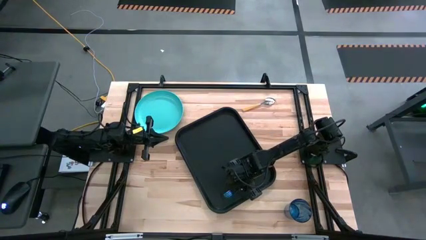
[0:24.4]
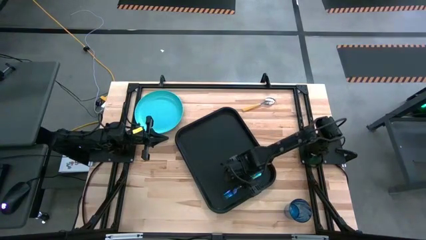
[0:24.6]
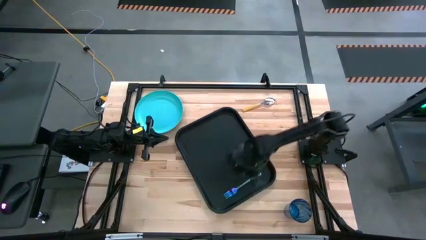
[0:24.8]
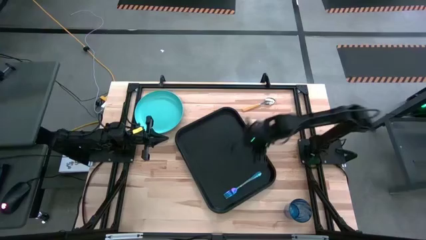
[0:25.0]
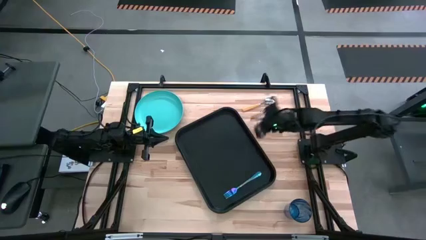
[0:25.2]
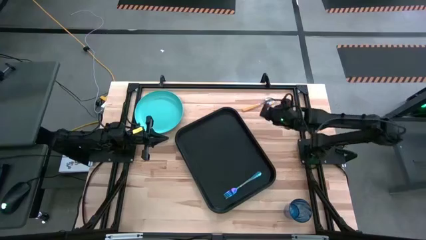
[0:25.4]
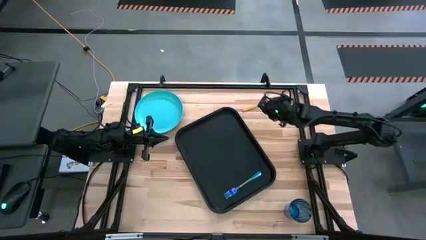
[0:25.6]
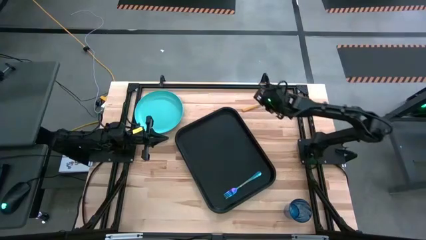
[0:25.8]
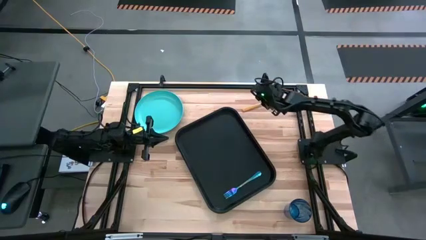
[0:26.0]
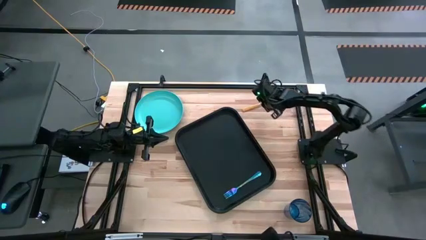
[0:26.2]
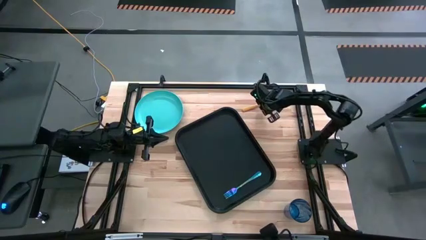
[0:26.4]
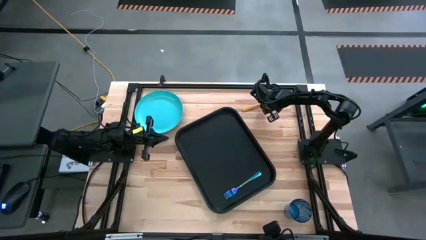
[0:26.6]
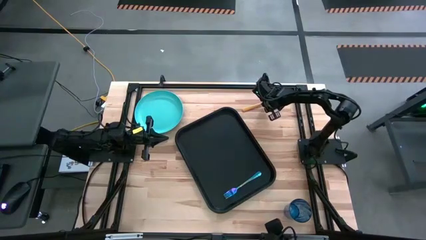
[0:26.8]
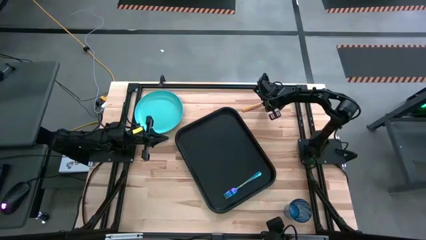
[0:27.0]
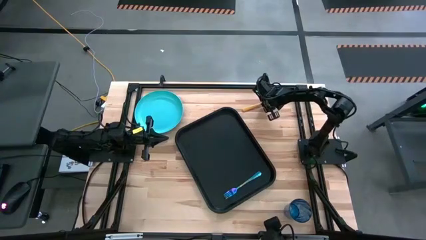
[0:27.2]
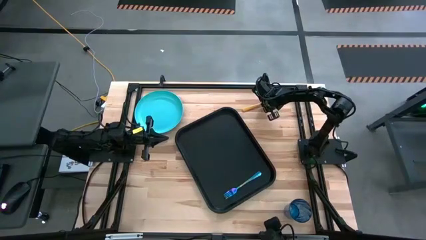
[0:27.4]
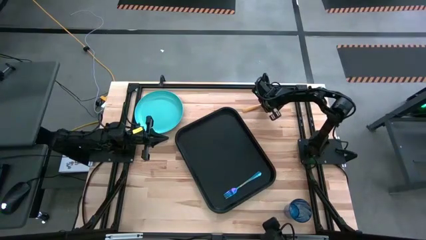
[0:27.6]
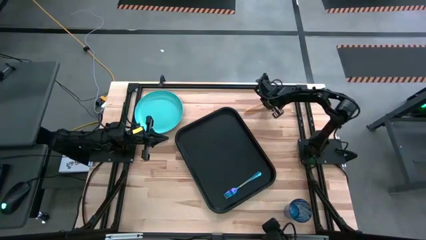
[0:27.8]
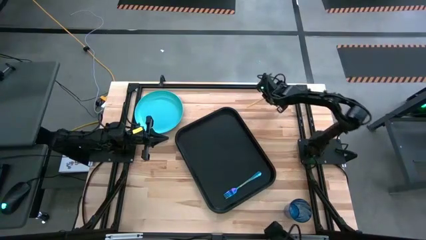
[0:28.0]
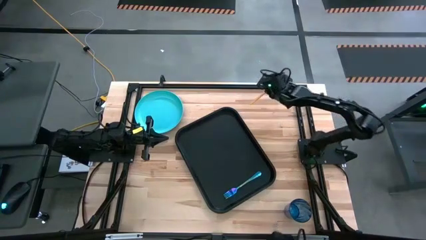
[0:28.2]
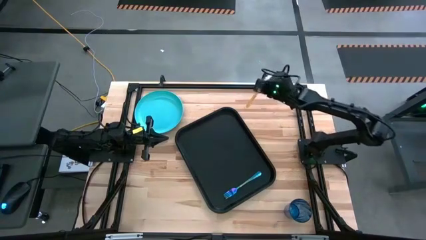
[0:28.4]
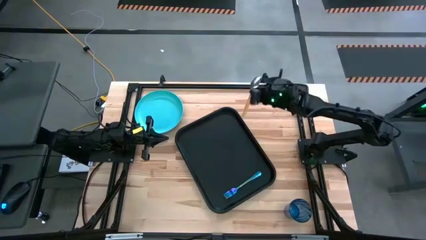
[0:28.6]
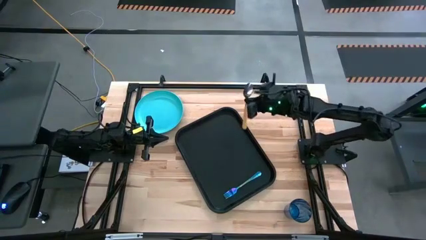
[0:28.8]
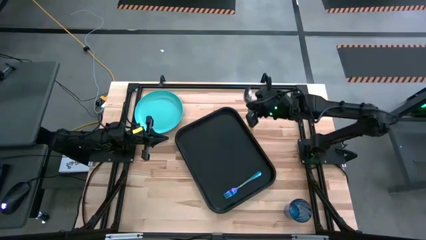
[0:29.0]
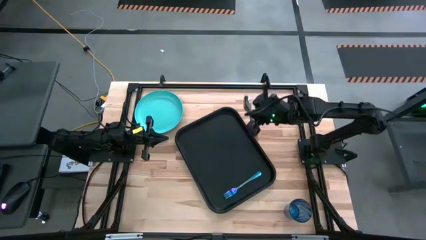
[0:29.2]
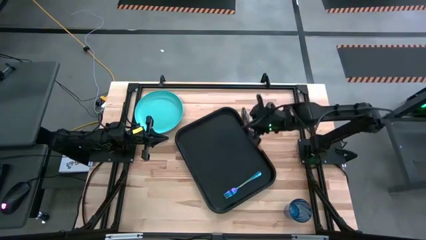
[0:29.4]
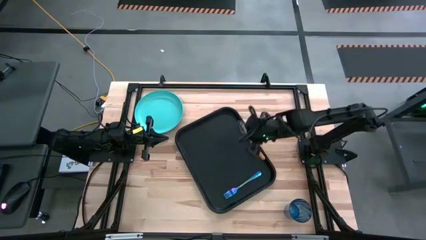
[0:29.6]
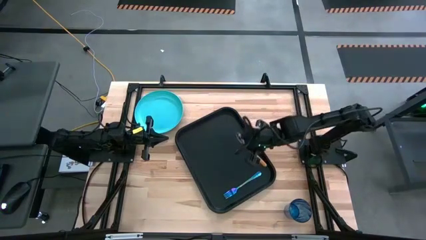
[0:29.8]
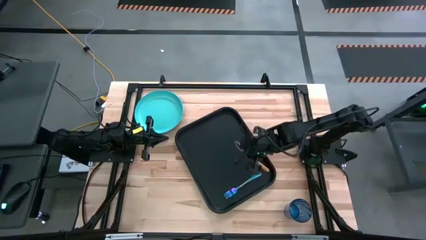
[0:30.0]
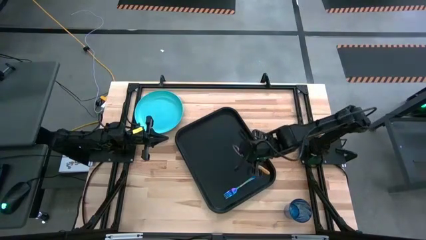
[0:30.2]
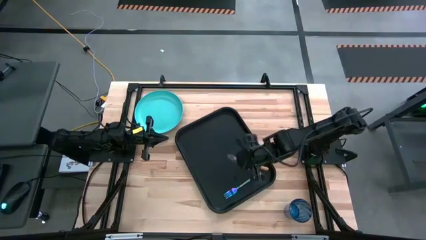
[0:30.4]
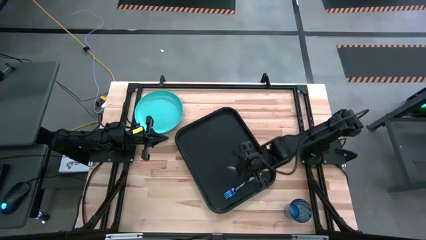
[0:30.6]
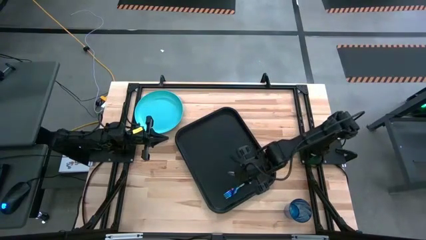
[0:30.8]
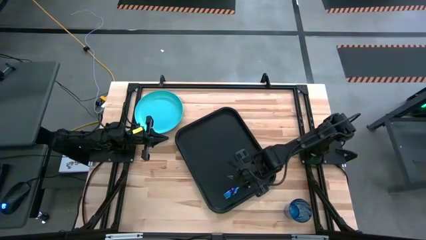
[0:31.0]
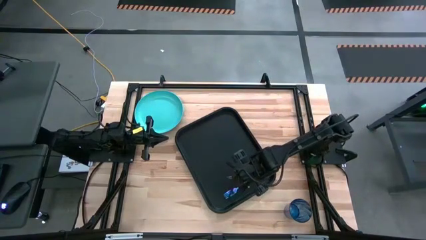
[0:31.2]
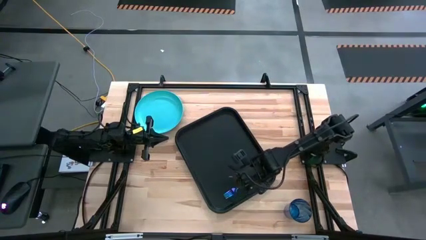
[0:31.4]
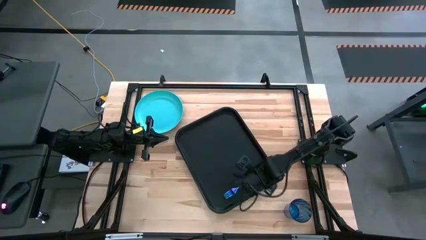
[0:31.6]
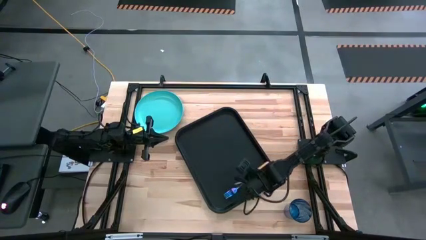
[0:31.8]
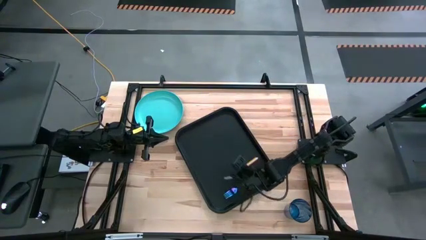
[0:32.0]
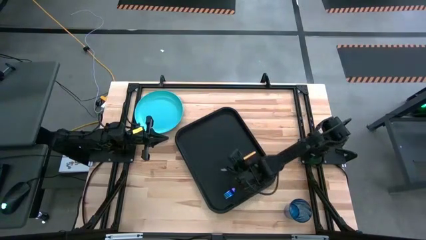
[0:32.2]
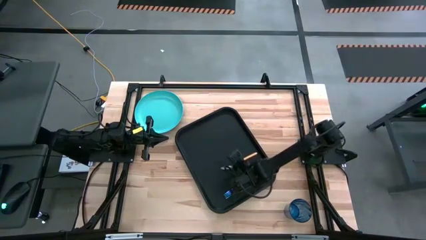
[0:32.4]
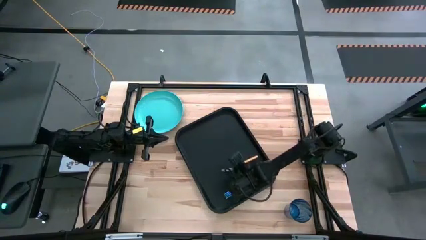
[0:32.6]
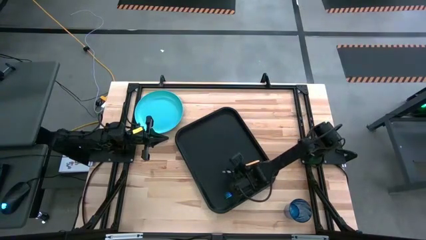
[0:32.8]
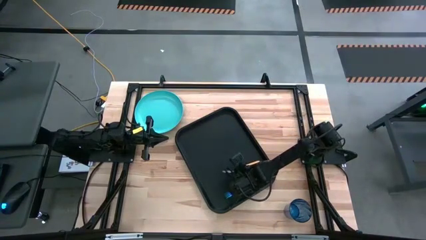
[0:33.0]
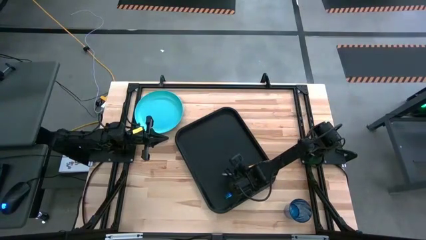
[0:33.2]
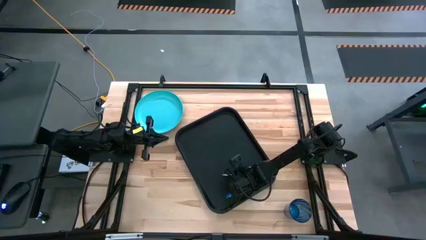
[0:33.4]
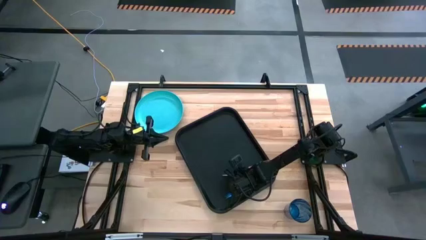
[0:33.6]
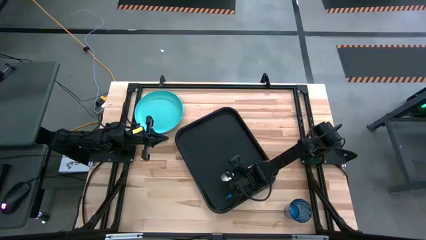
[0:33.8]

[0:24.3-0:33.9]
Task: Pick and place plate/cup/fork/spoon on tray
Put the orange spoon on the black serving tray to the right of the blue fork

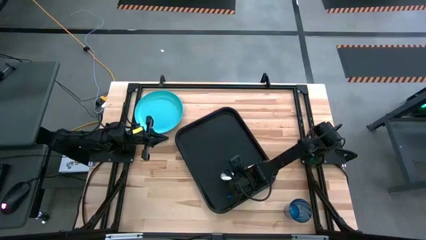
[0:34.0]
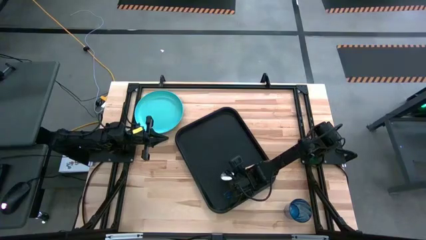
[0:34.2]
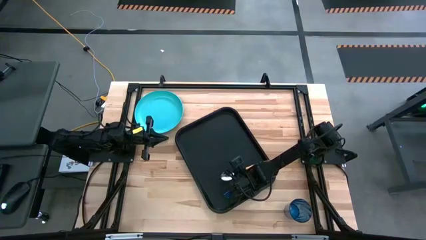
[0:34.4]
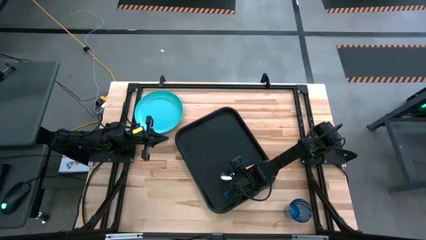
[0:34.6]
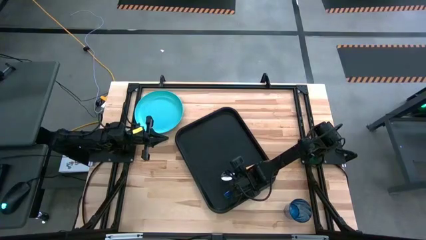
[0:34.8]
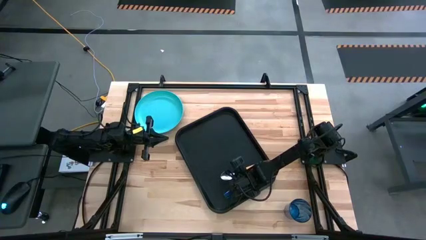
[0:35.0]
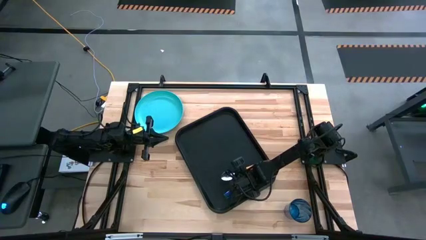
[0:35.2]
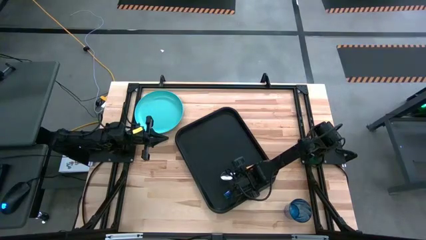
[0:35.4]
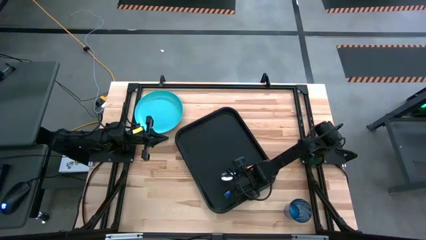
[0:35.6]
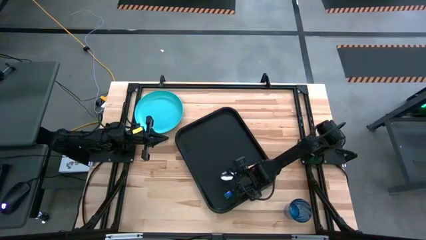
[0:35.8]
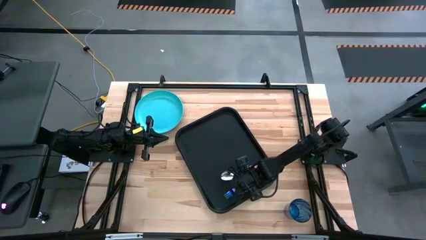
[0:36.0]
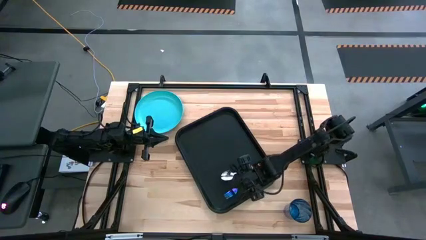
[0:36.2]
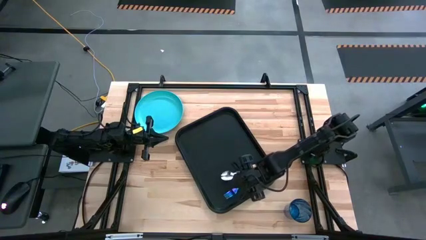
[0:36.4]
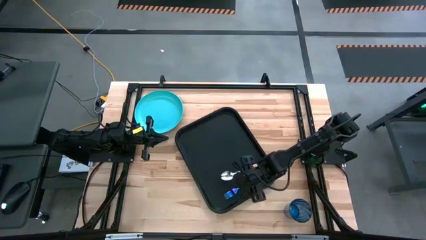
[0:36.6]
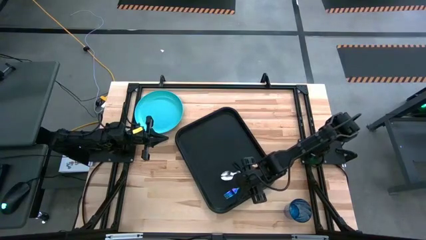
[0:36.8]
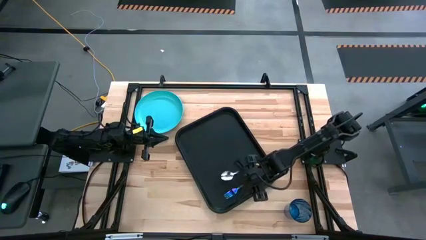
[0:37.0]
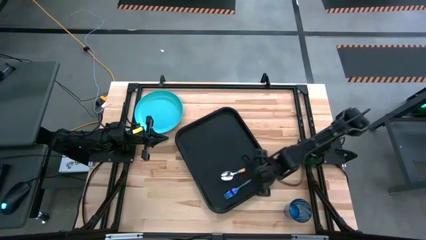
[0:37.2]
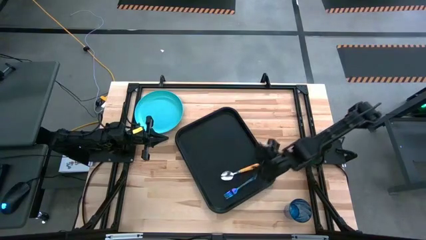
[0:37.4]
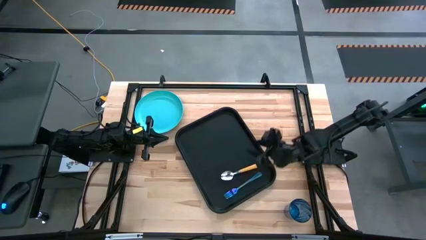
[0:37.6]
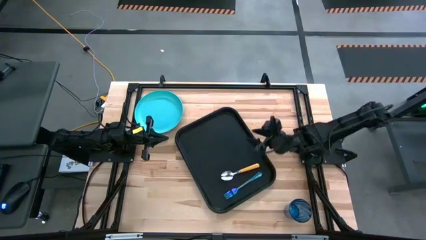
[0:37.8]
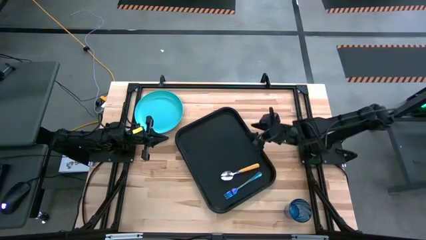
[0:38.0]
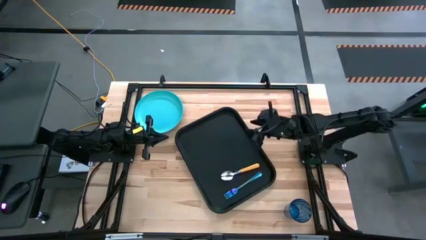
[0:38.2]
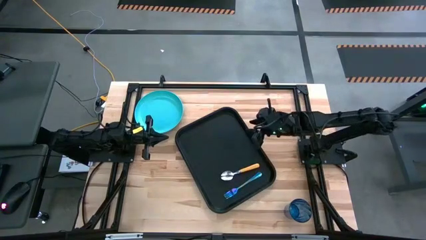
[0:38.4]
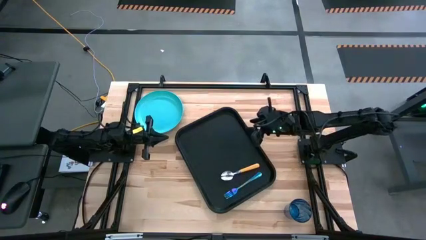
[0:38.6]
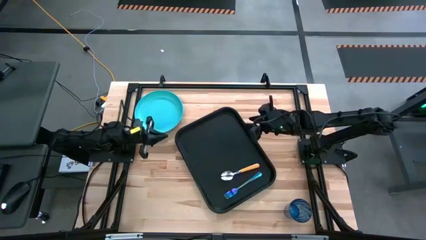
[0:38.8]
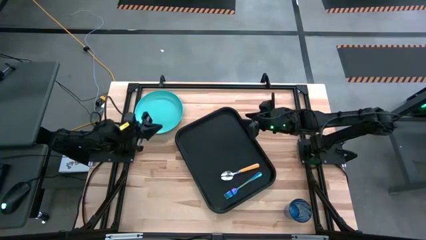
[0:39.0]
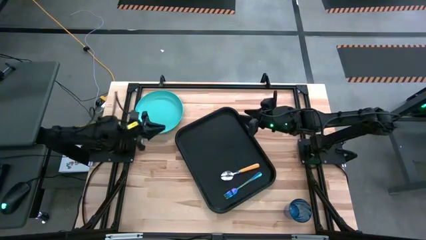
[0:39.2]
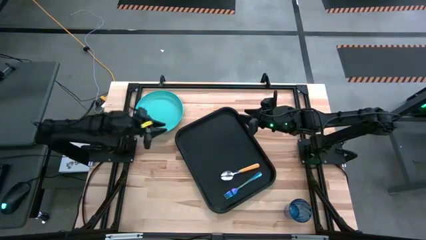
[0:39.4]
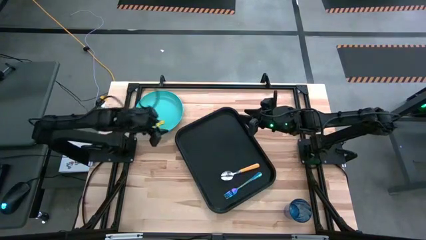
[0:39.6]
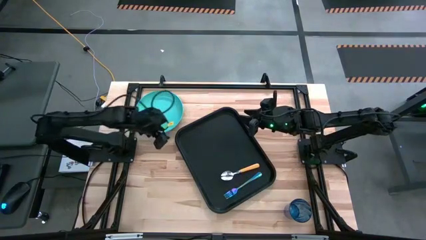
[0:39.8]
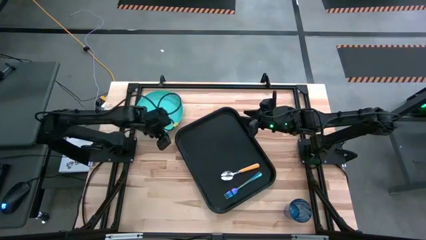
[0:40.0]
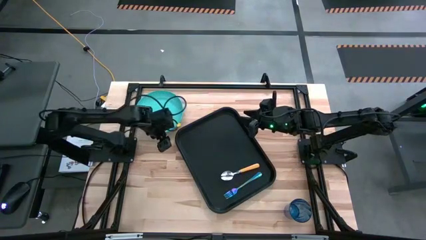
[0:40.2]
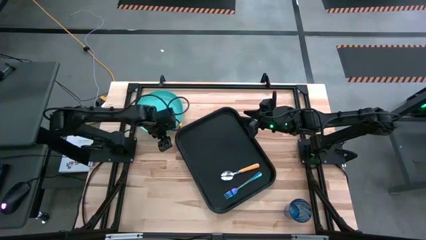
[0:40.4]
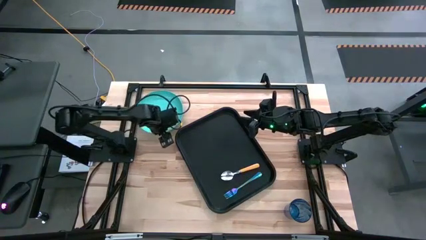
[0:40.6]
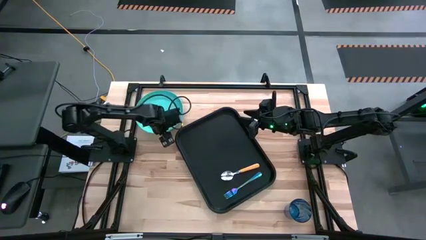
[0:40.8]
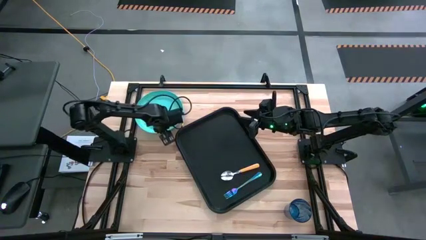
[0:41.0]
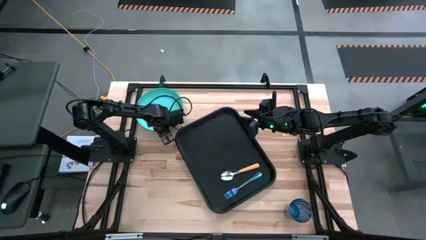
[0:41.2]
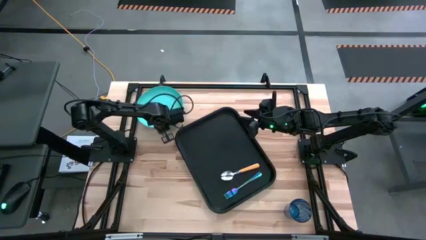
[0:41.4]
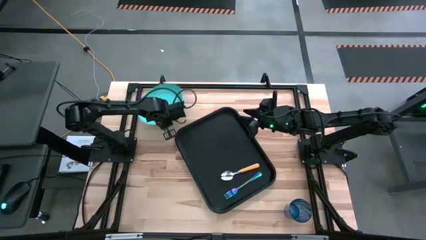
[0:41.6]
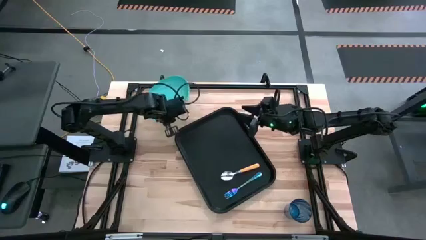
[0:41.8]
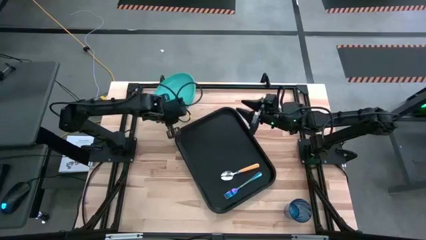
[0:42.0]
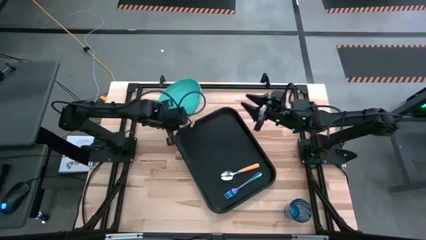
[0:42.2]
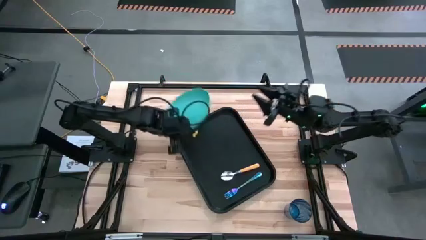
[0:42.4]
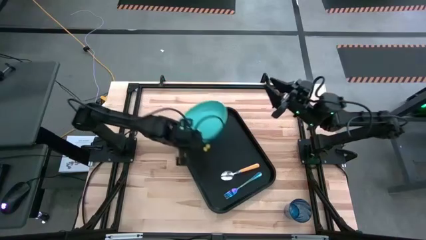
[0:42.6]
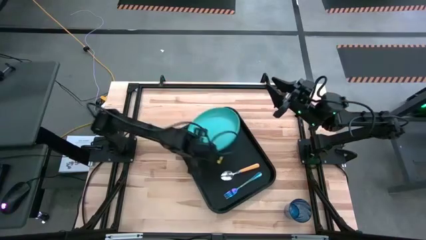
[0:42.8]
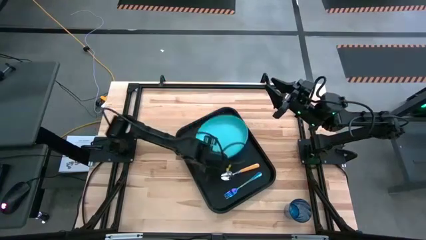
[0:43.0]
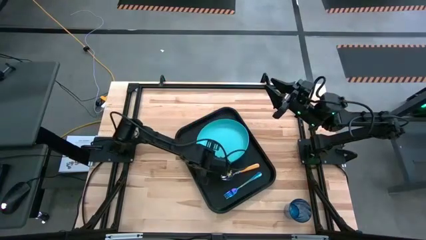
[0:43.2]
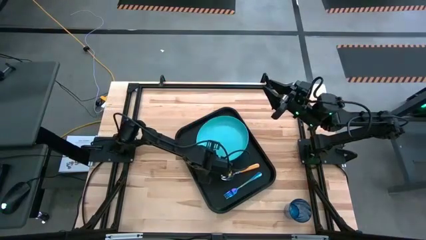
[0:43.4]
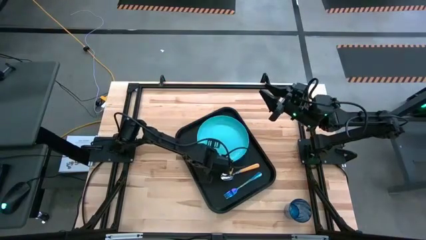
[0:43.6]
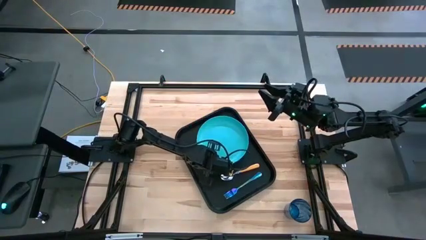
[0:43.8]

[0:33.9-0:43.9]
Put the blue plate on the black serving tray to the right of the orange spoon
